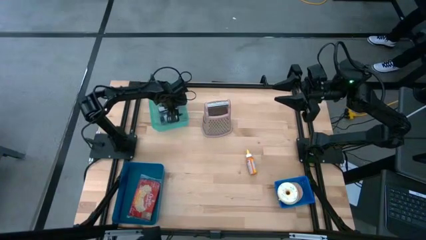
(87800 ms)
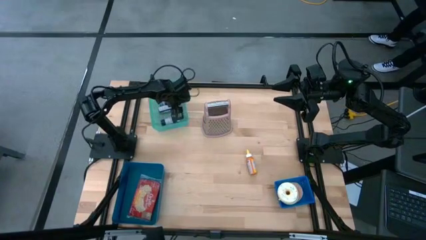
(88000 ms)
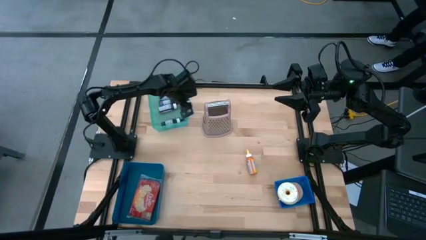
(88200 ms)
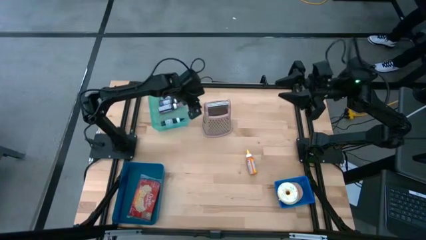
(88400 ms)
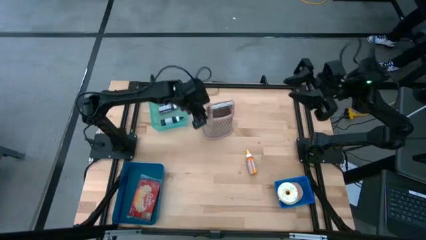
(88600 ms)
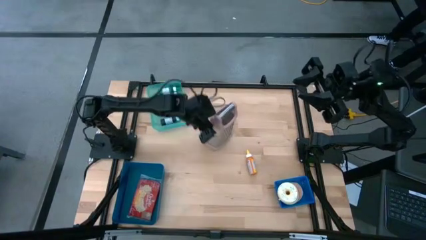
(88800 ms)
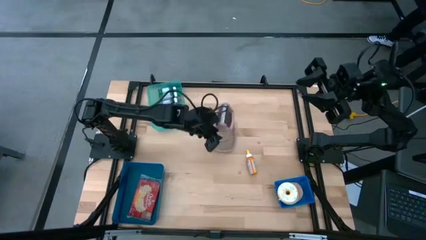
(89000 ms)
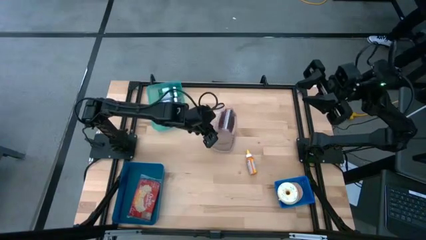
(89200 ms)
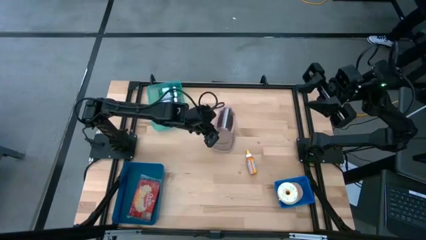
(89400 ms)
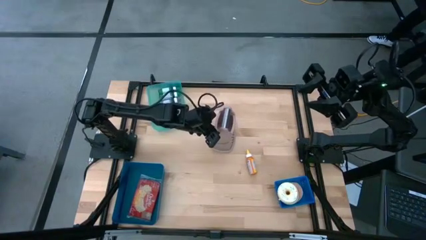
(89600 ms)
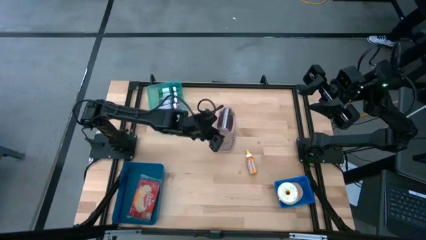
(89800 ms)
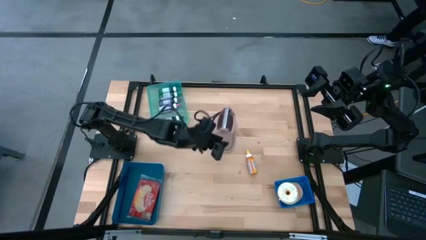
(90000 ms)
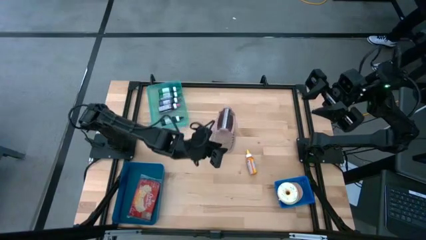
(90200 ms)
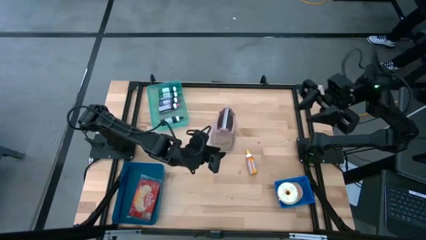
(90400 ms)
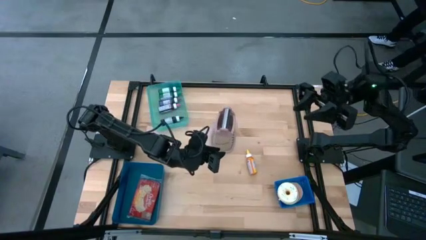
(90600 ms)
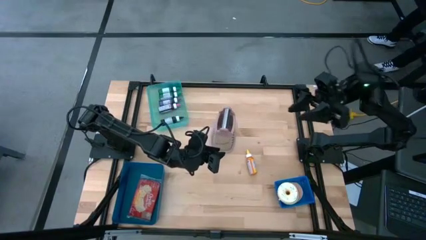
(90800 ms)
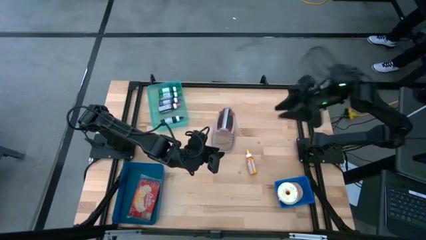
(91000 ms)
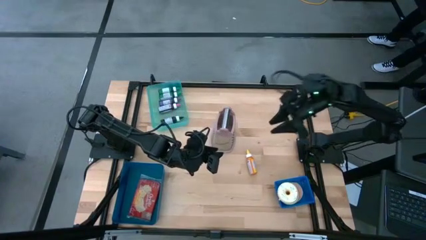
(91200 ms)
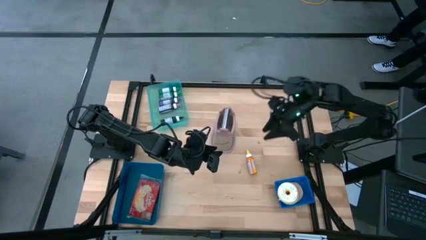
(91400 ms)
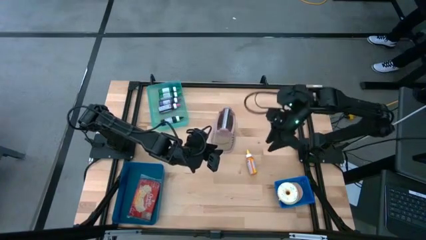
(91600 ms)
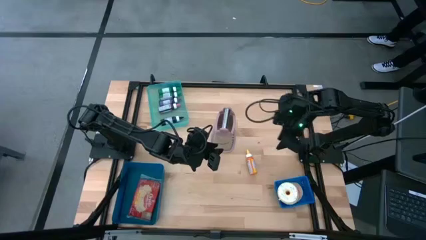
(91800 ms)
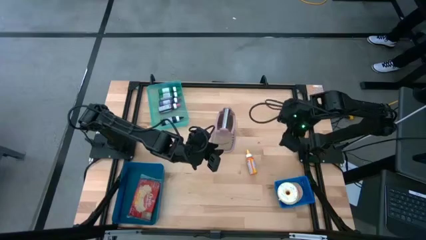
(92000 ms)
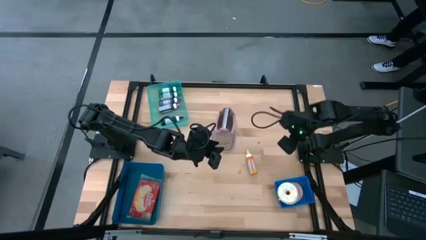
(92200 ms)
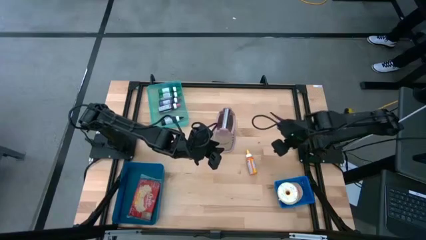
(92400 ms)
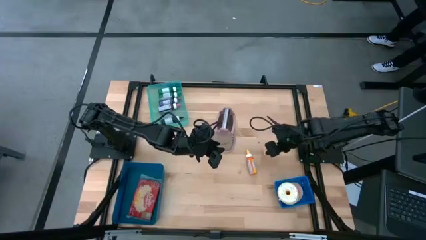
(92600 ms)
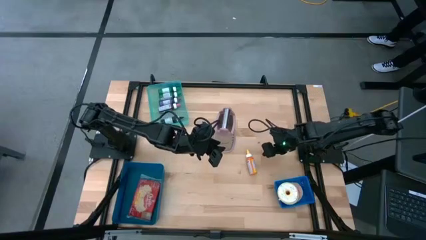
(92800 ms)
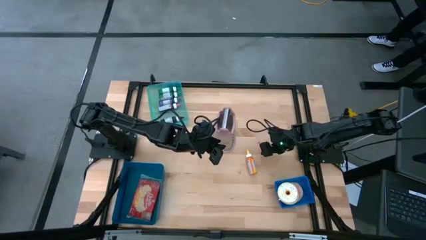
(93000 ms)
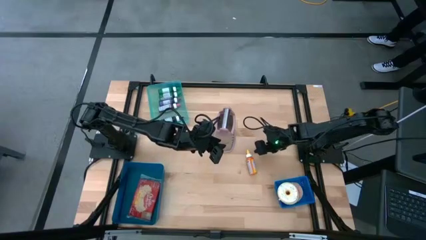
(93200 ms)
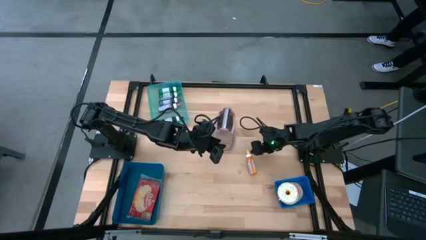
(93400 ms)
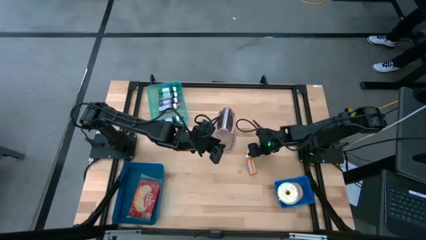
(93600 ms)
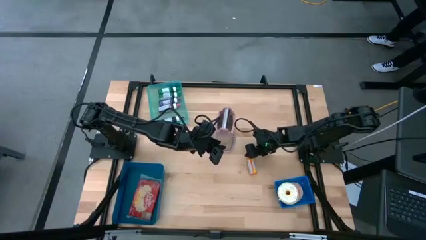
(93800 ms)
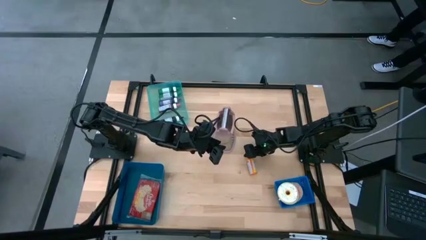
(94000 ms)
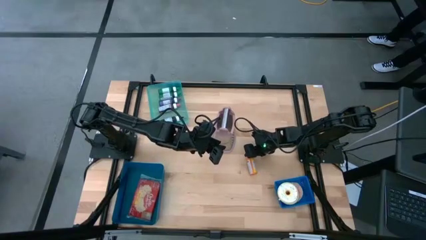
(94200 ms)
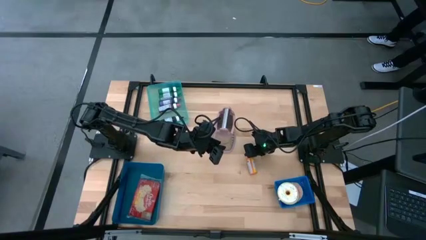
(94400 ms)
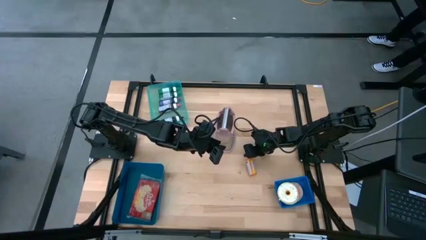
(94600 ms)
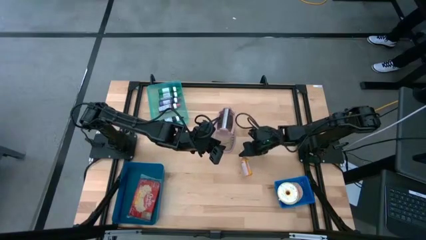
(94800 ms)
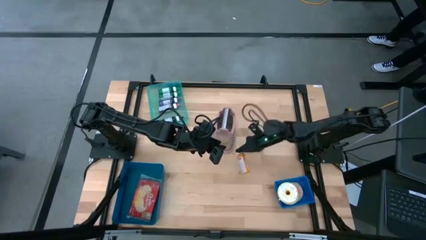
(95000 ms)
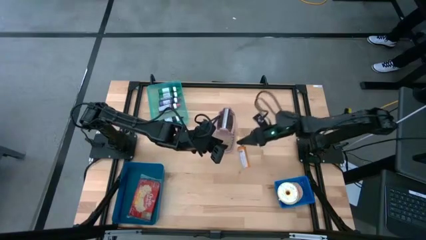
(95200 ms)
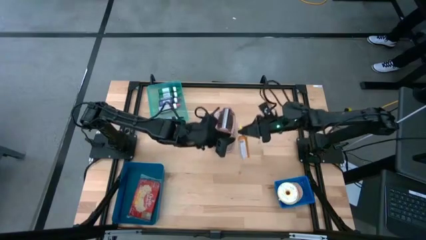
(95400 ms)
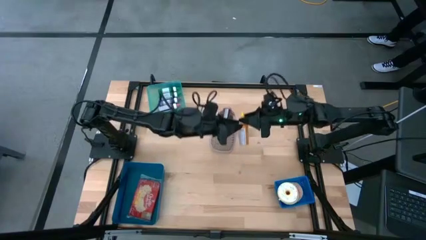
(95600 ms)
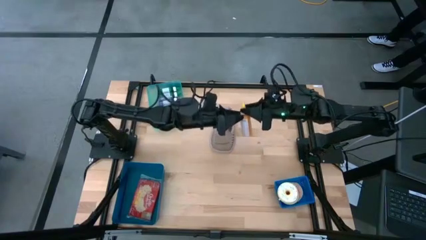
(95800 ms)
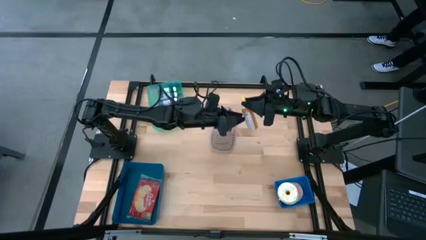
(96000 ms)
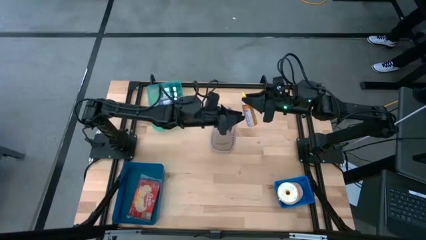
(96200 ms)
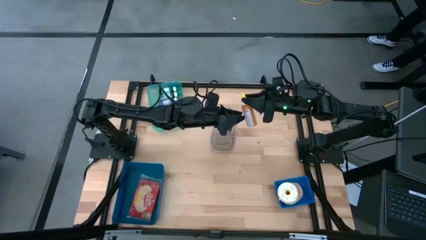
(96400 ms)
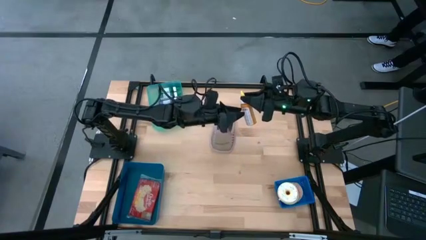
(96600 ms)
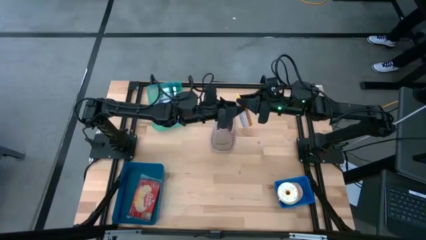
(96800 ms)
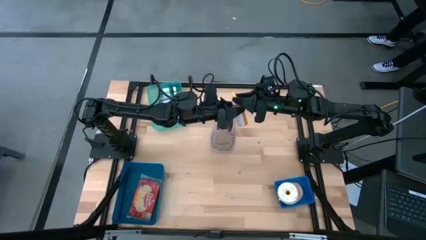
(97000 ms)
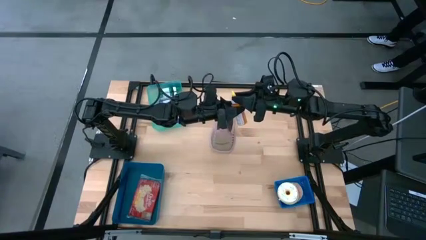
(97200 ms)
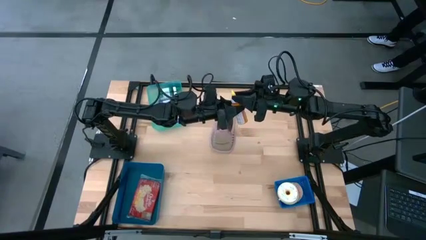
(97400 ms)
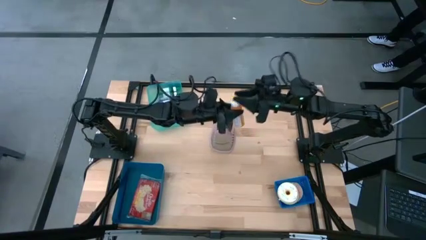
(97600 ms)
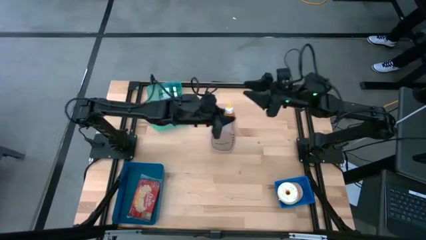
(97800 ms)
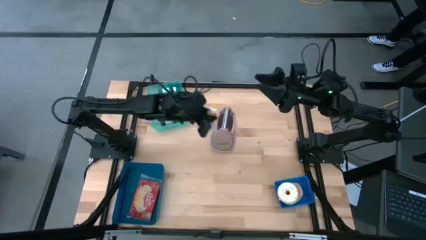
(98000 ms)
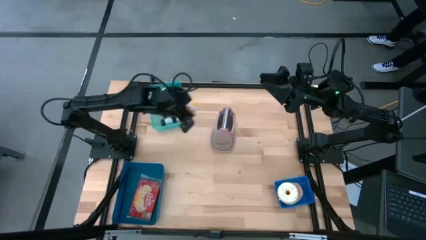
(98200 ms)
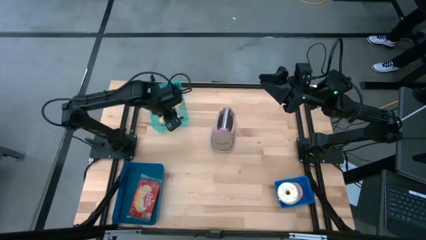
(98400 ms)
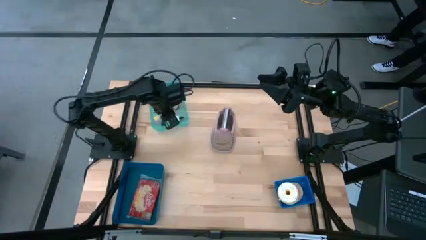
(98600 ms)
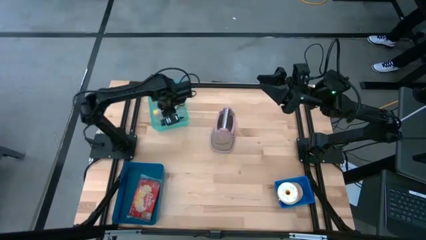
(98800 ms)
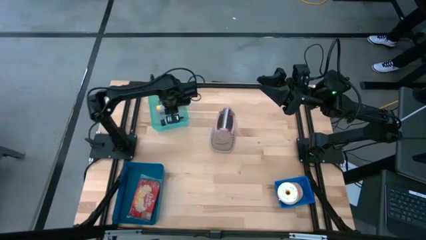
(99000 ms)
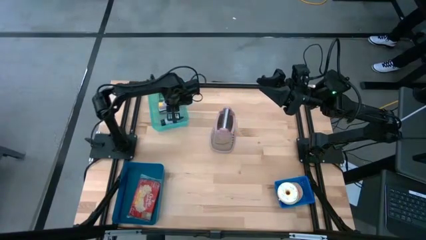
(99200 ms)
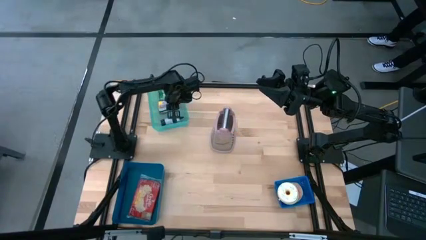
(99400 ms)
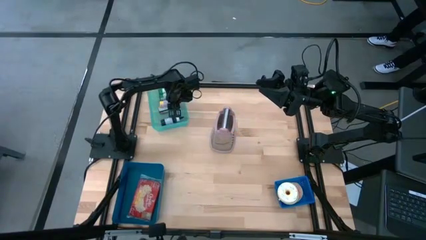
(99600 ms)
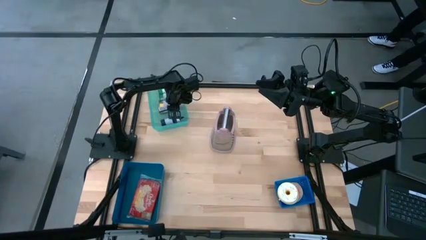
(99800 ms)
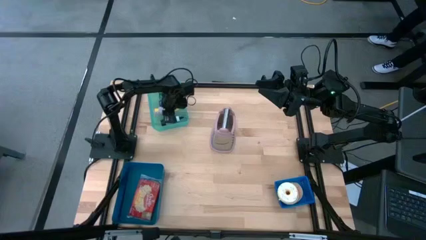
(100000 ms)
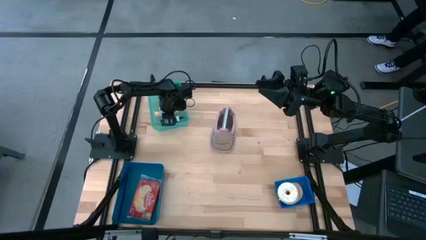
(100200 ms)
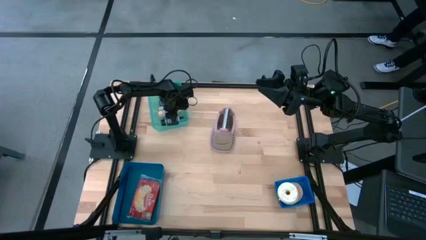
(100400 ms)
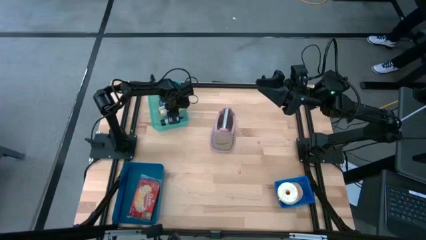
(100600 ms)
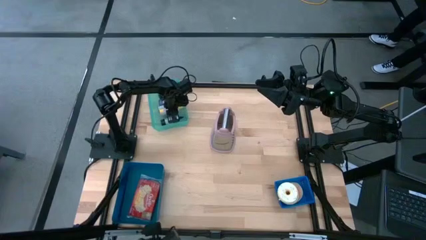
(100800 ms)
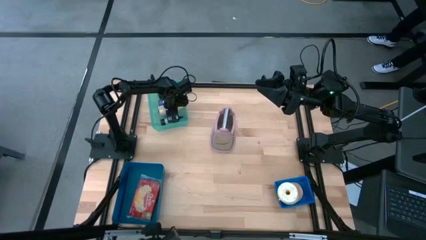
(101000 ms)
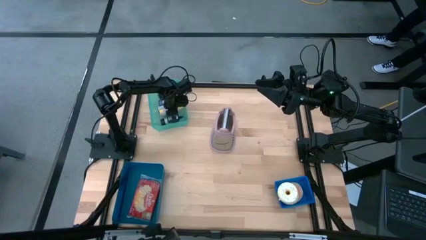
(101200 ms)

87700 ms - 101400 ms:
Put the yellow food coloring into the green bin

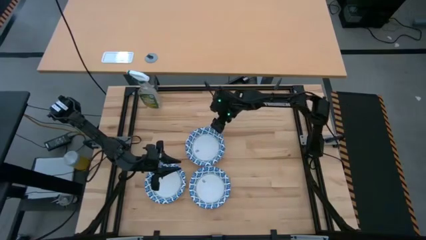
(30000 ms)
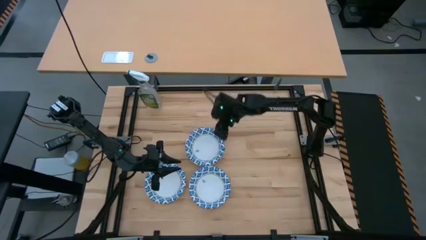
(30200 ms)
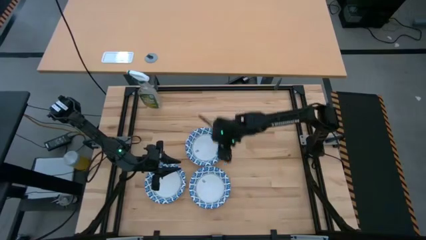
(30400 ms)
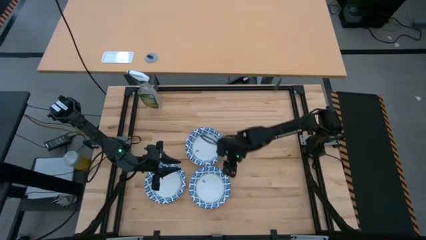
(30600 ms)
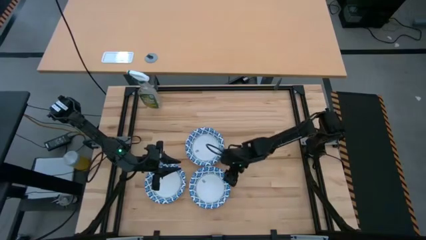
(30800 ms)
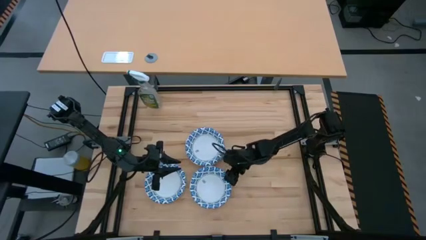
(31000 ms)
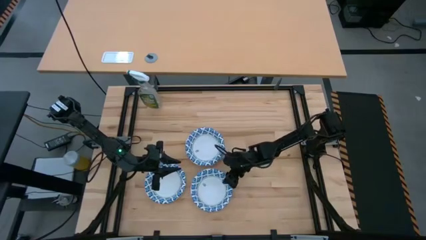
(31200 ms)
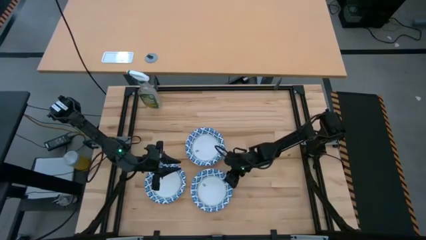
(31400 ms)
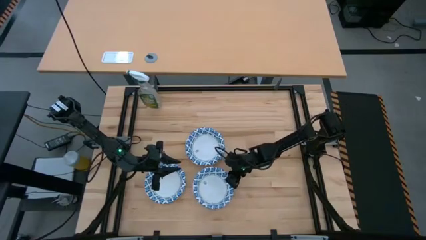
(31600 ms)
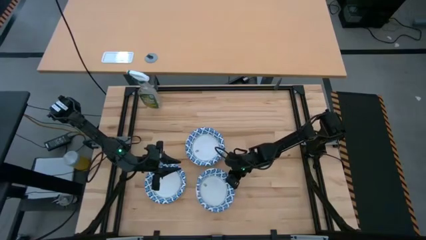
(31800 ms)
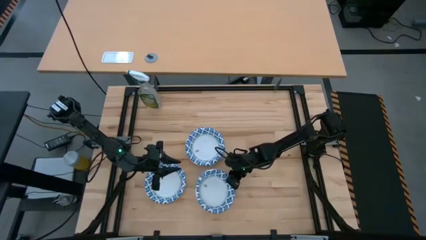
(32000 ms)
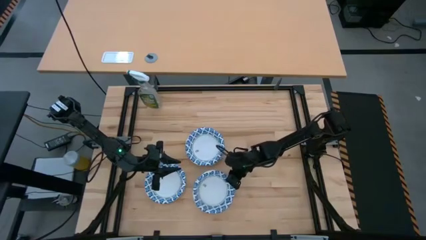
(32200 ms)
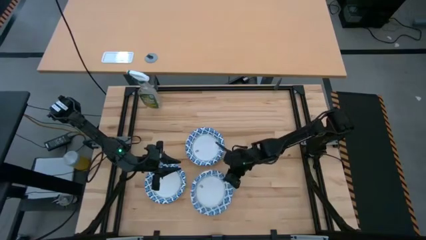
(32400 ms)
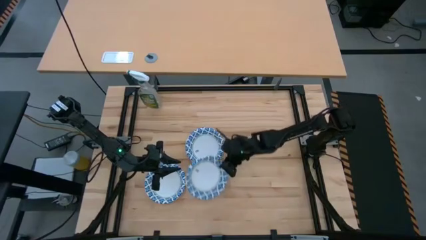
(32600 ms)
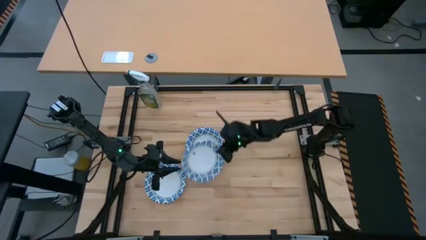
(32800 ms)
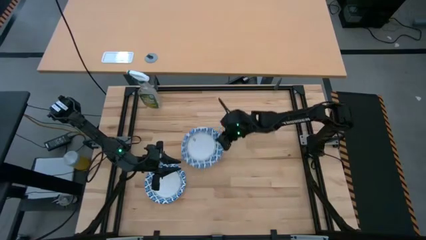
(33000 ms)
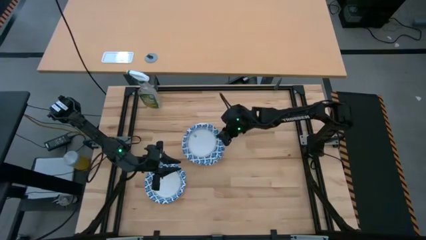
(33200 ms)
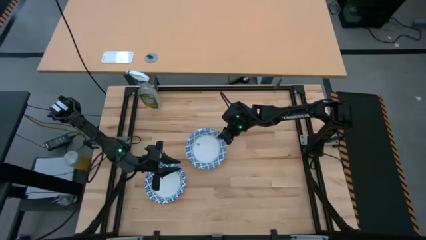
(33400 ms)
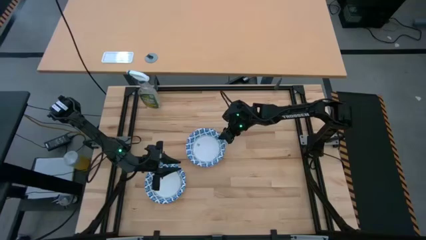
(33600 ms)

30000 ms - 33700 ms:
Put the white bowl on top of the white bowl
